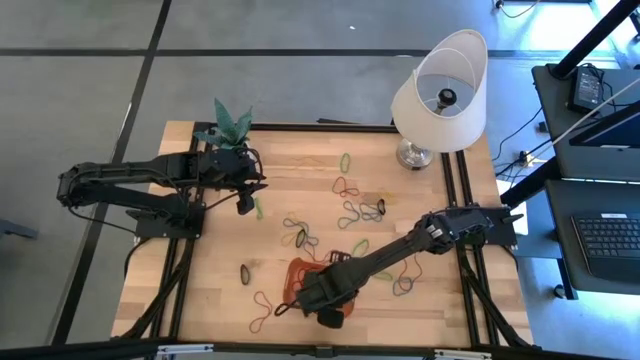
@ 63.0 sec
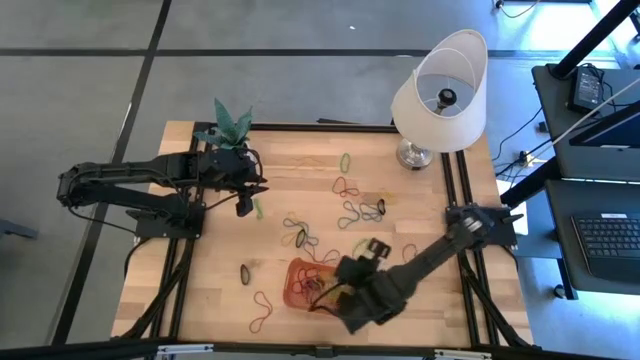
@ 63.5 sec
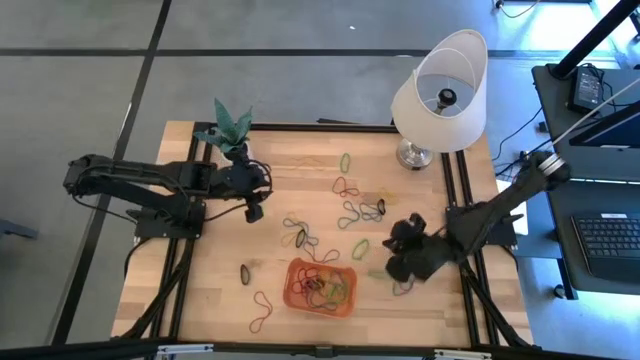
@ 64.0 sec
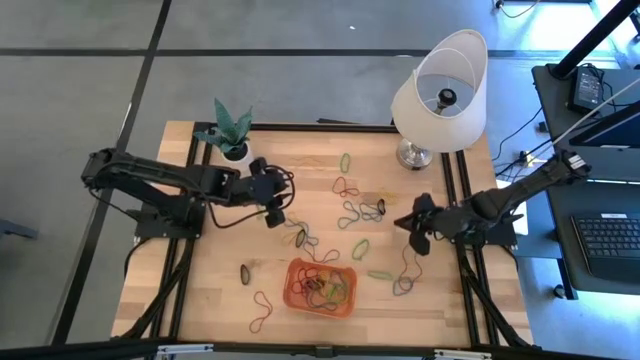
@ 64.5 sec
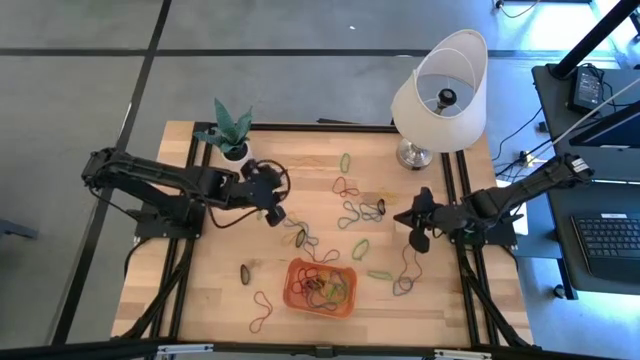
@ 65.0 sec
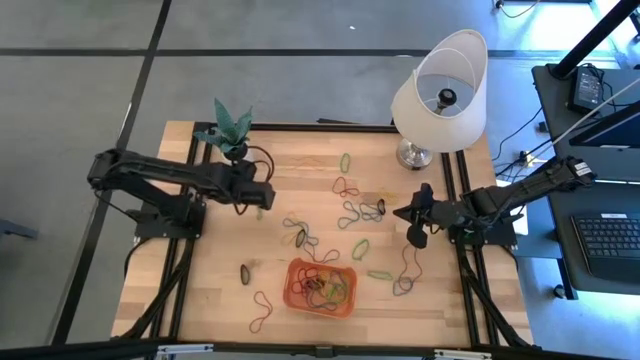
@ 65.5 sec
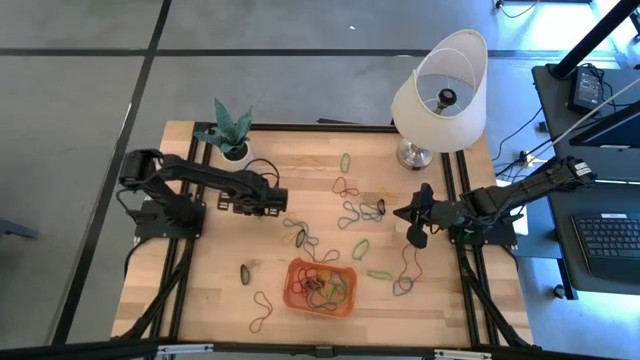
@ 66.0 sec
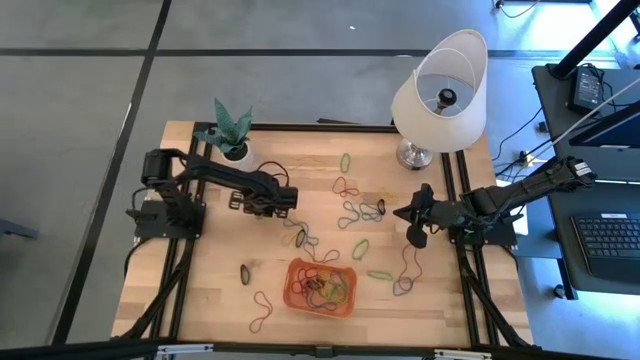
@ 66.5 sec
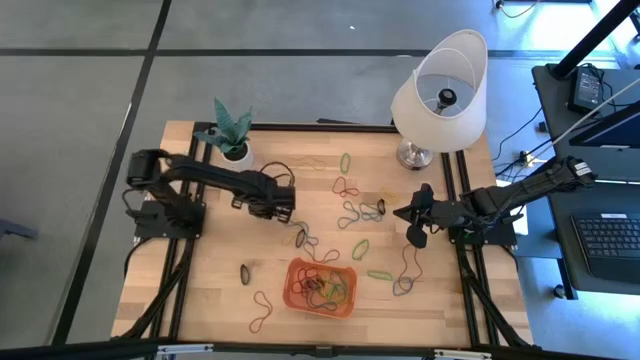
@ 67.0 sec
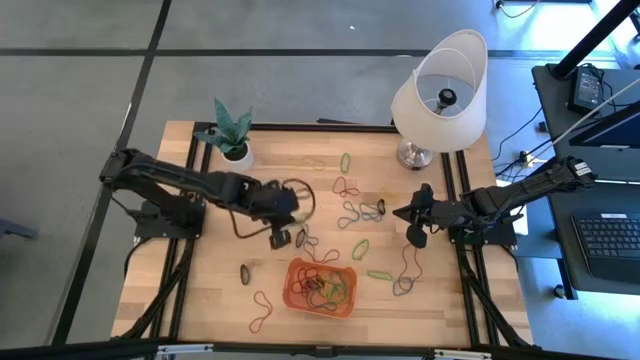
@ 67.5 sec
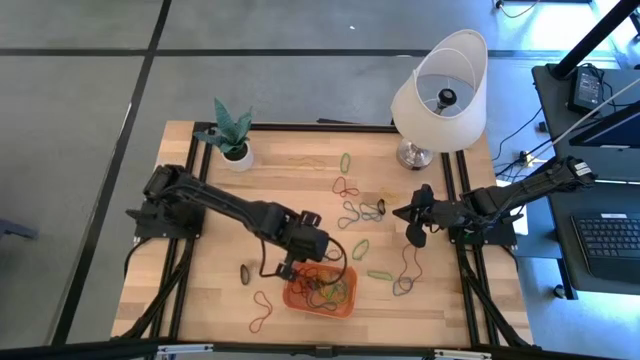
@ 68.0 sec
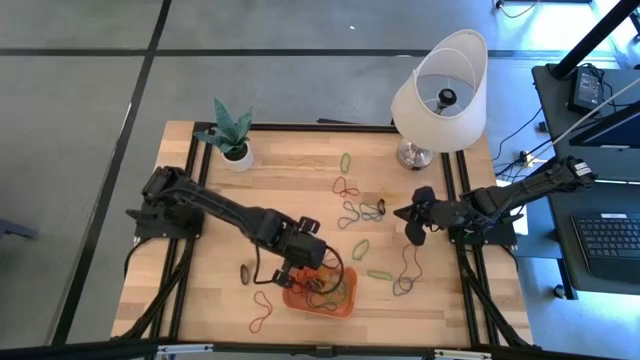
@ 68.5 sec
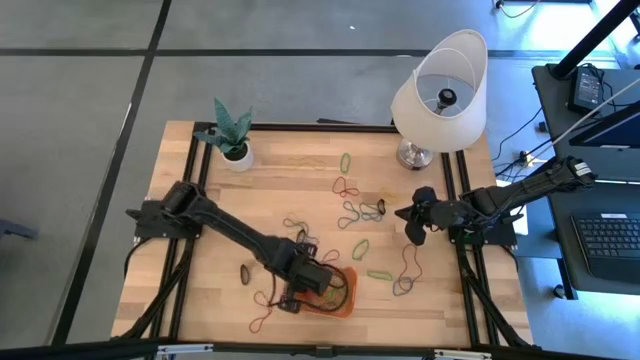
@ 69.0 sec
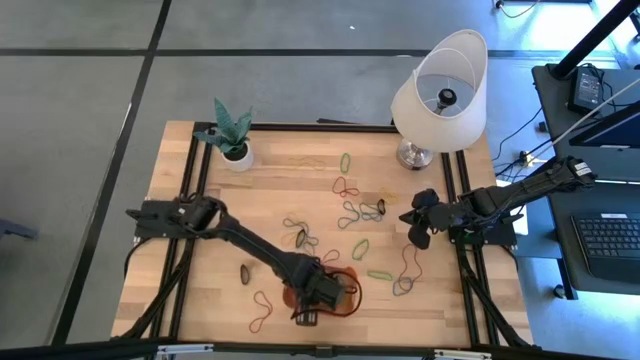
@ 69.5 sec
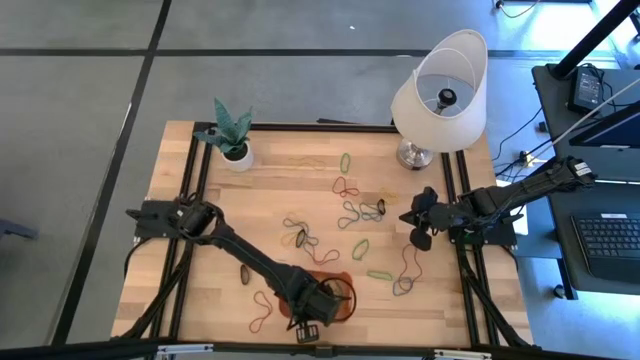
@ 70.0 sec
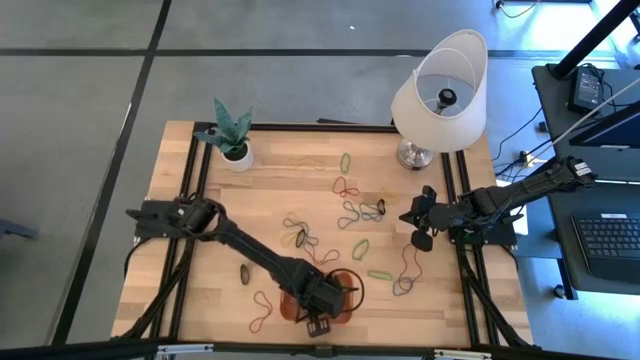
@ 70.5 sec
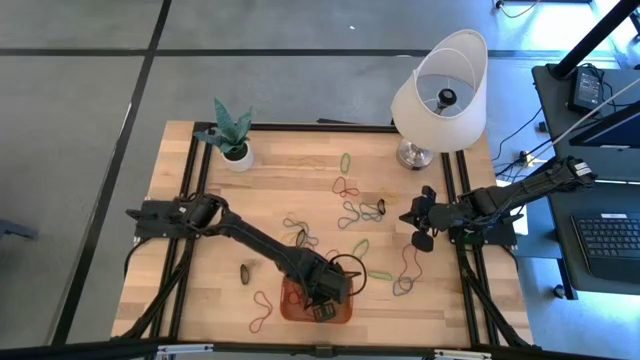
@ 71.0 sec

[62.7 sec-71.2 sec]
Task: Pick and place rubber bands into bin
Put the green rubber band into the bin

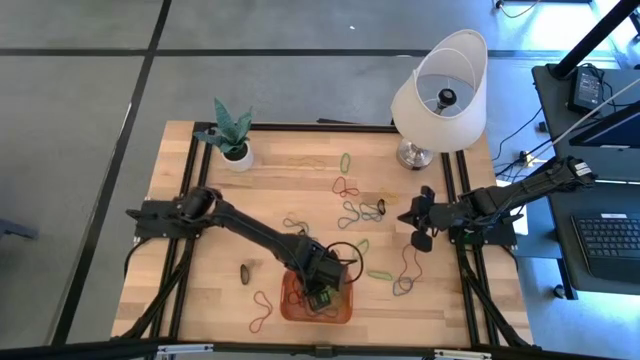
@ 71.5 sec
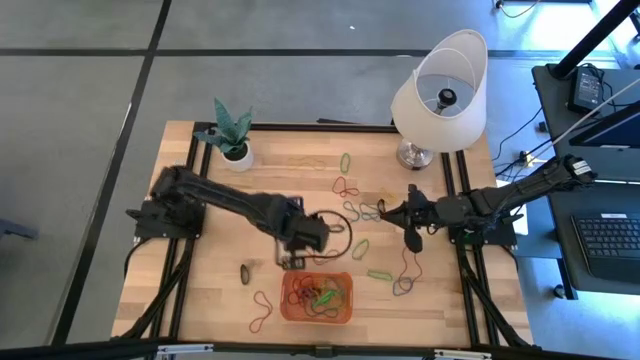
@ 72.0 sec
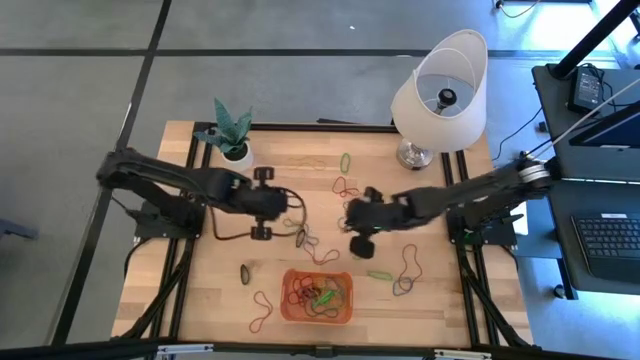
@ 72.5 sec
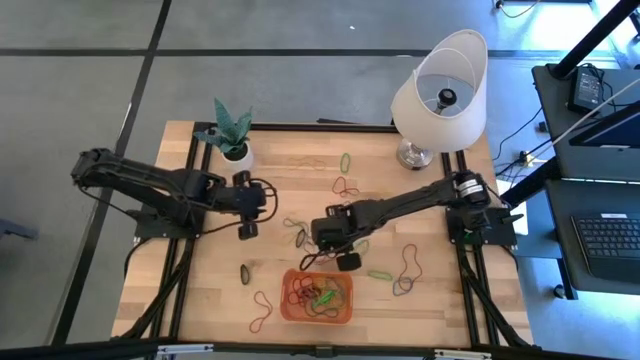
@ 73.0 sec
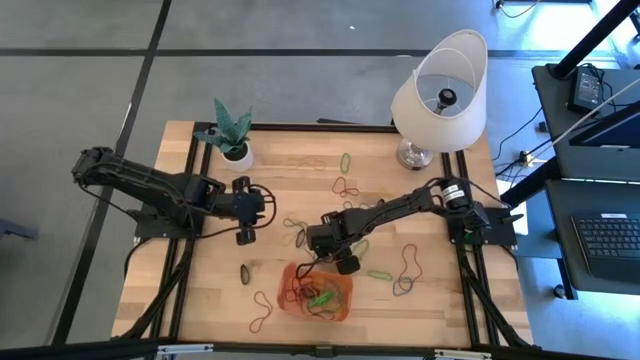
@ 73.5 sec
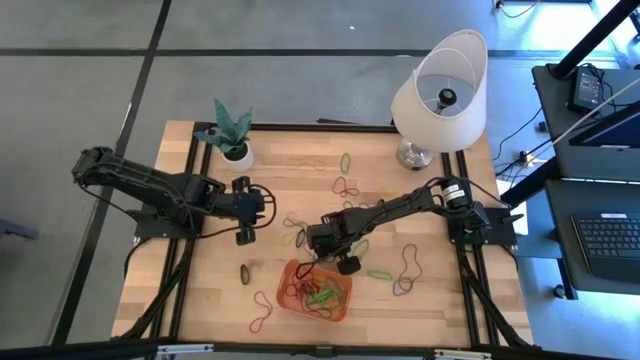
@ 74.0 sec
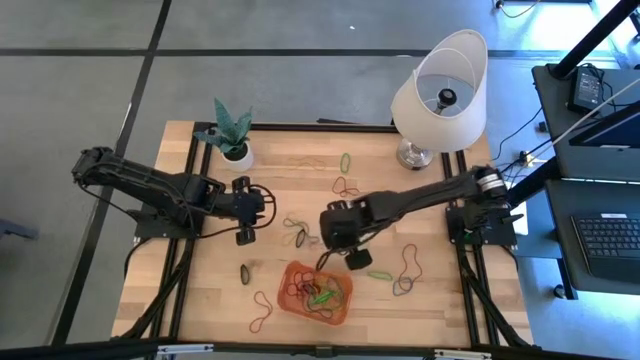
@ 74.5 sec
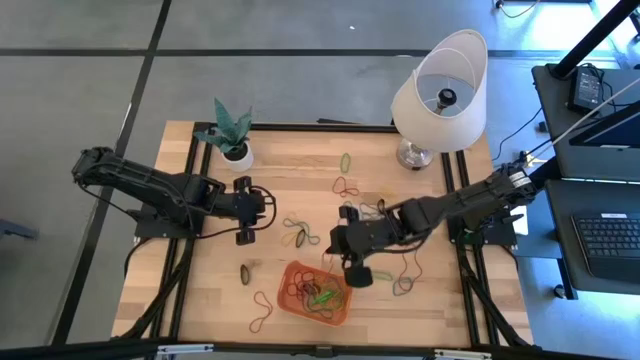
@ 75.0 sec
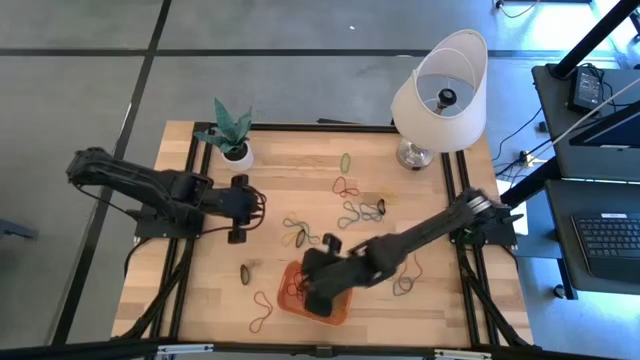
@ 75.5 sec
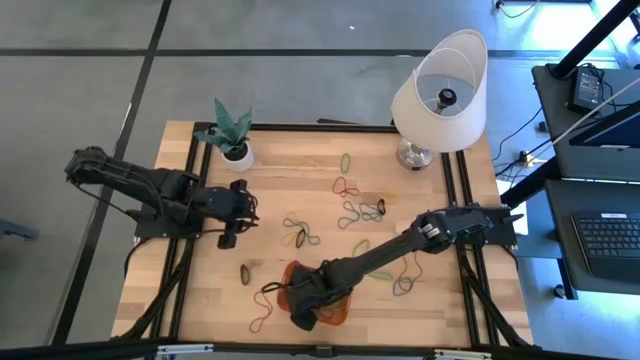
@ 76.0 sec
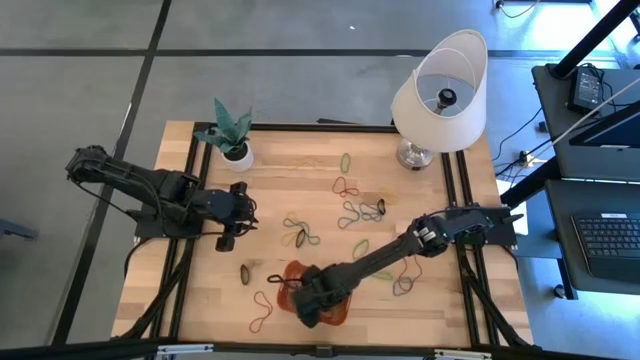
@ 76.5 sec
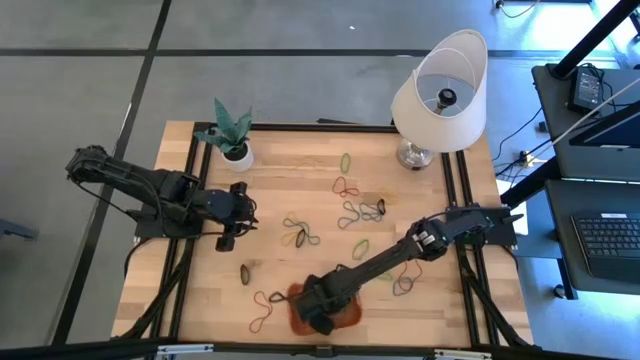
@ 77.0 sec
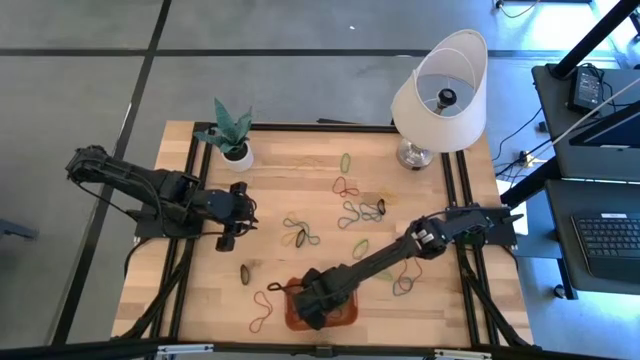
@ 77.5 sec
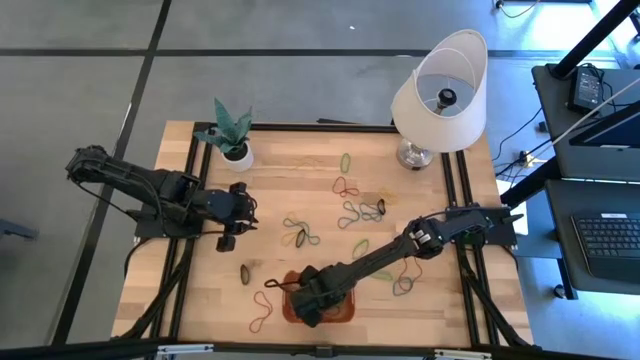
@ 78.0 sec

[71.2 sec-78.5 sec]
Put the red rubber band into the bin

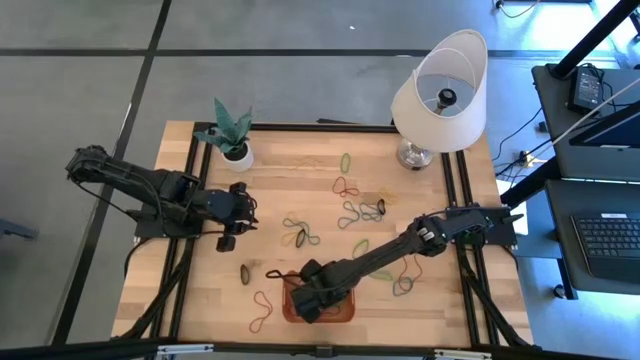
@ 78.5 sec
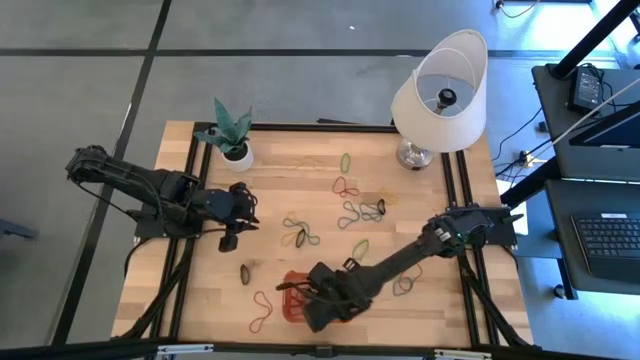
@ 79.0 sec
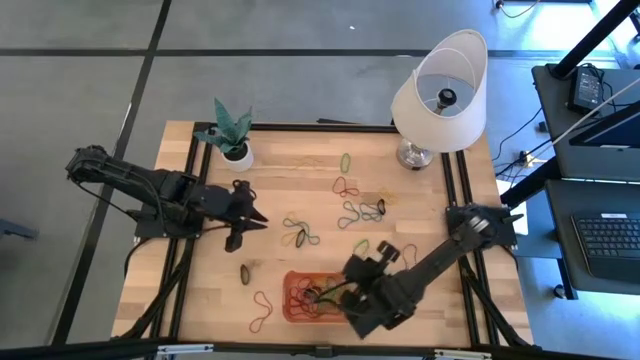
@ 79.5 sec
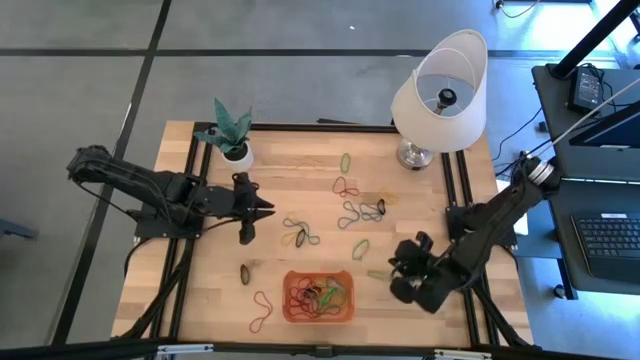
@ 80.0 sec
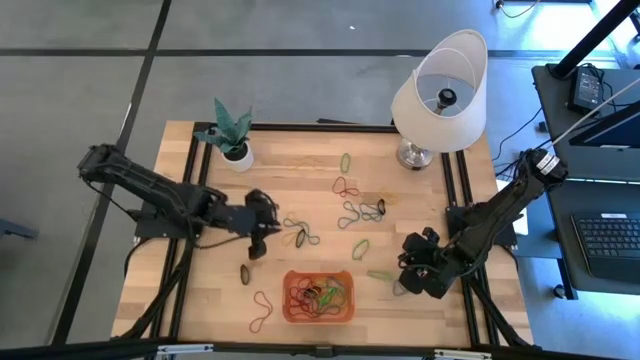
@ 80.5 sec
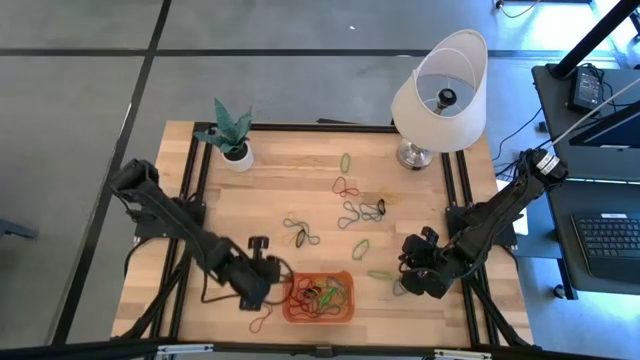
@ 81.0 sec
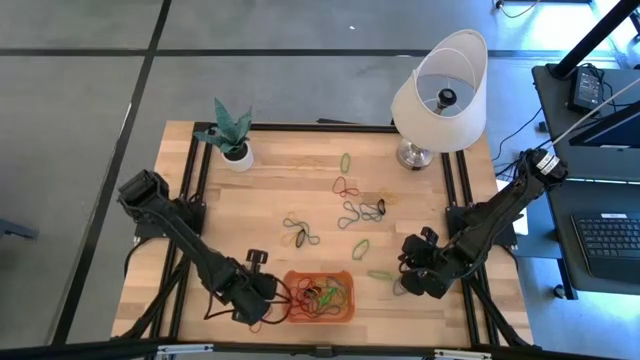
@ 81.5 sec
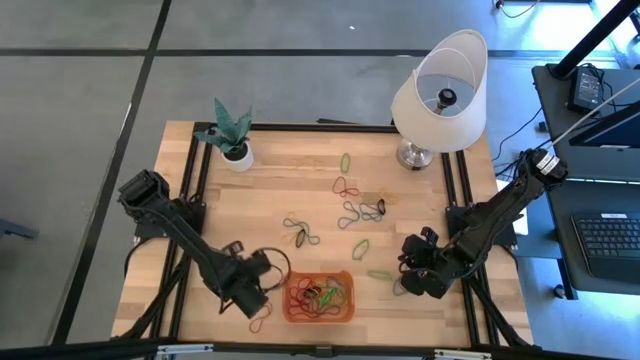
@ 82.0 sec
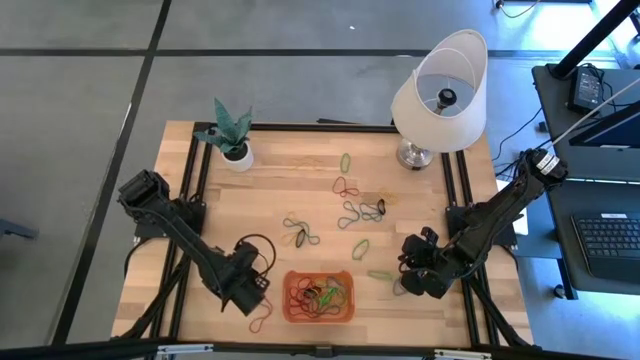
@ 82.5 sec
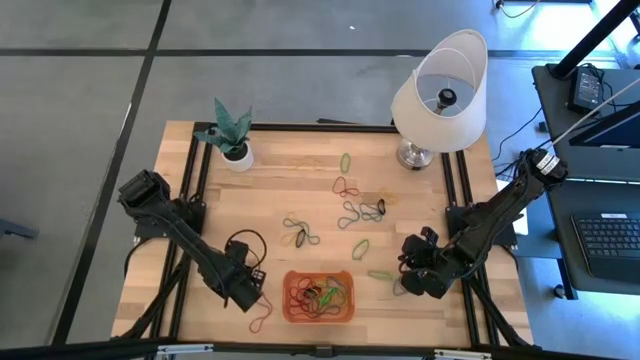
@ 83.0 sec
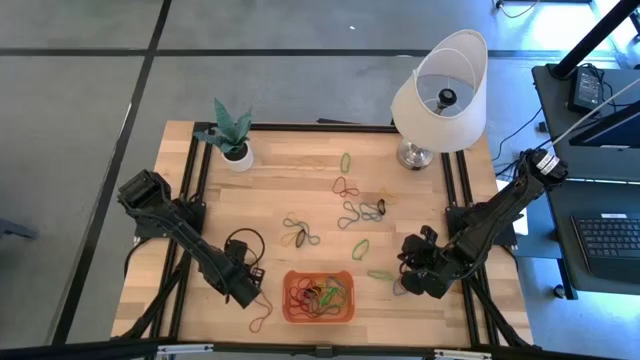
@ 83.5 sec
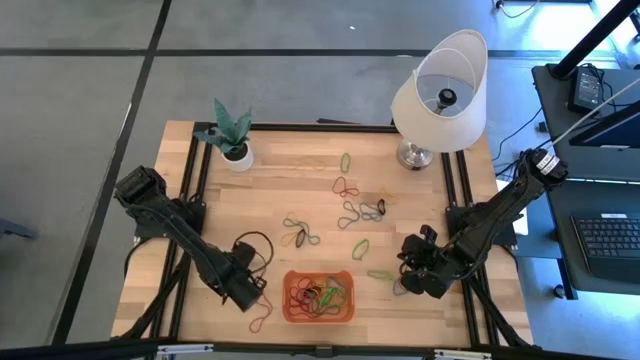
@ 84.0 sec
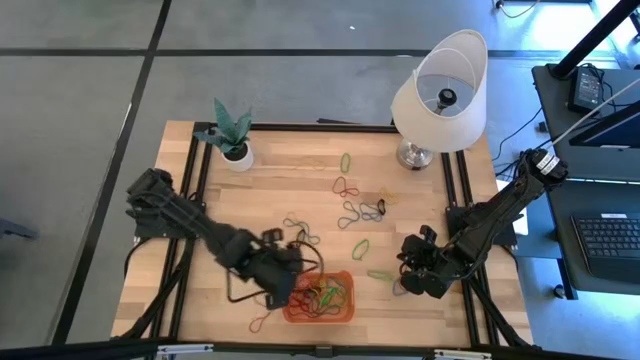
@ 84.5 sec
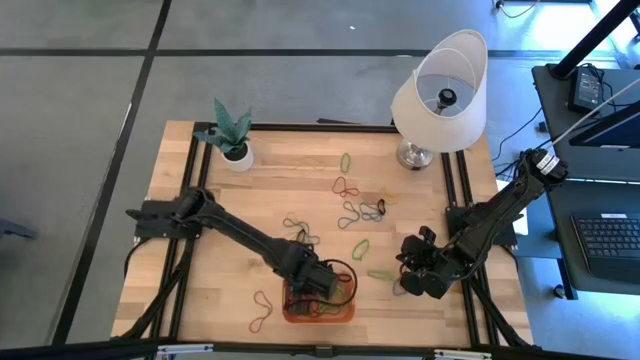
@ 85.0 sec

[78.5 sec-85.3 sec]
Put the left black rubber band into the bin
